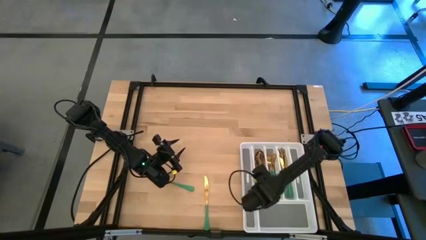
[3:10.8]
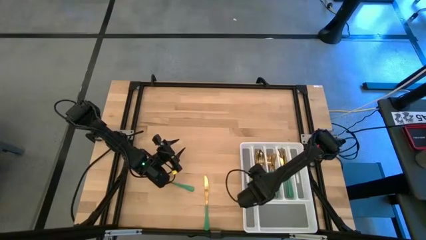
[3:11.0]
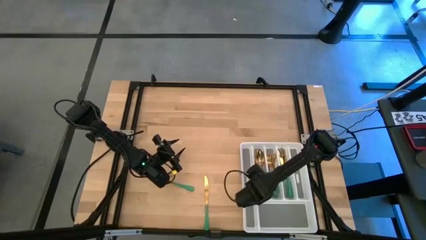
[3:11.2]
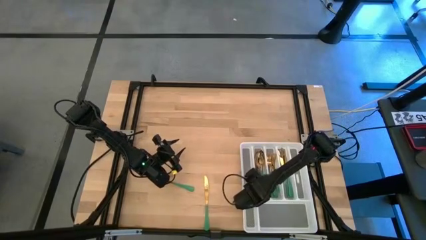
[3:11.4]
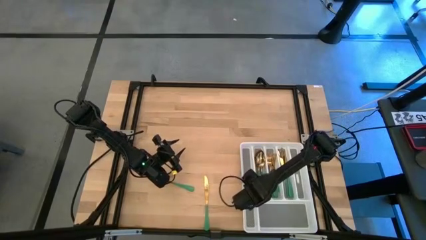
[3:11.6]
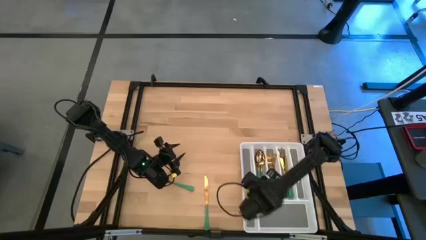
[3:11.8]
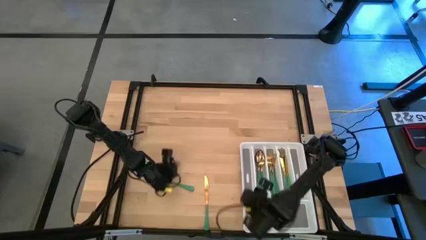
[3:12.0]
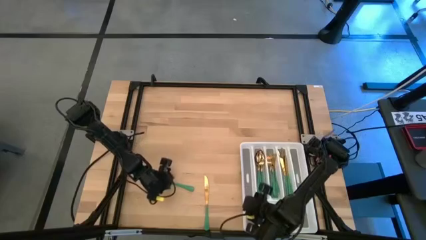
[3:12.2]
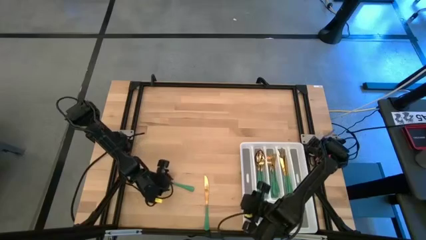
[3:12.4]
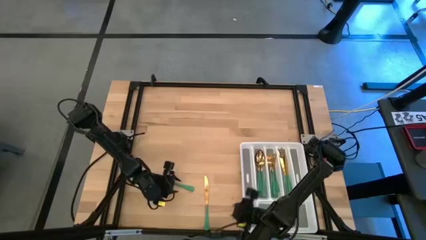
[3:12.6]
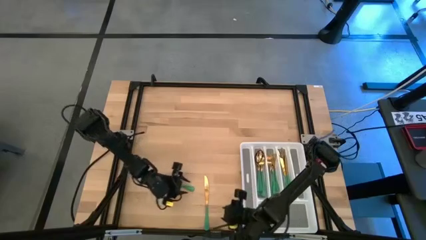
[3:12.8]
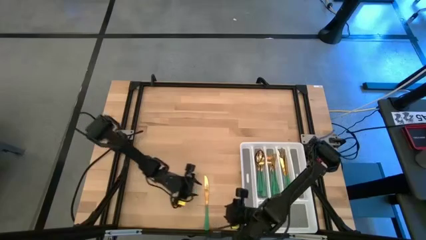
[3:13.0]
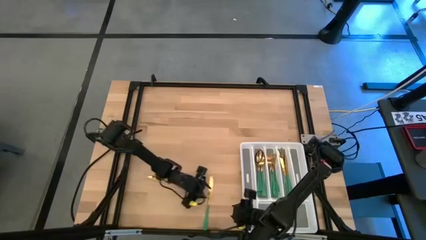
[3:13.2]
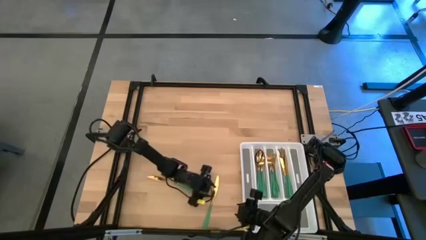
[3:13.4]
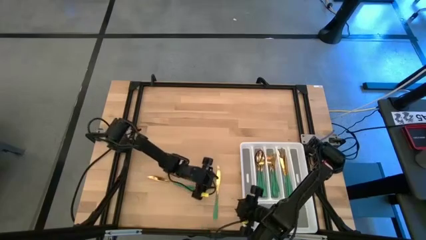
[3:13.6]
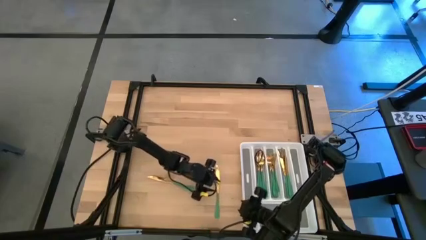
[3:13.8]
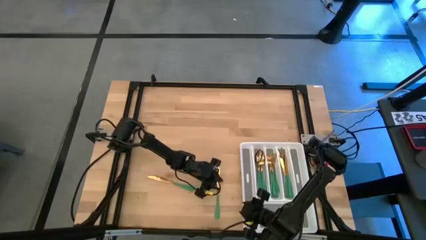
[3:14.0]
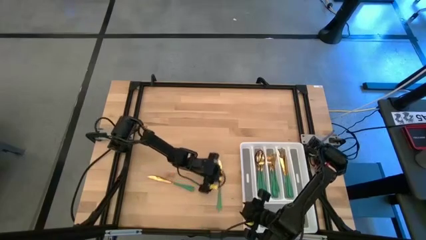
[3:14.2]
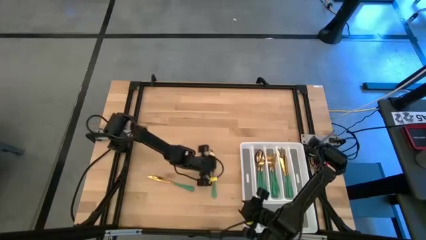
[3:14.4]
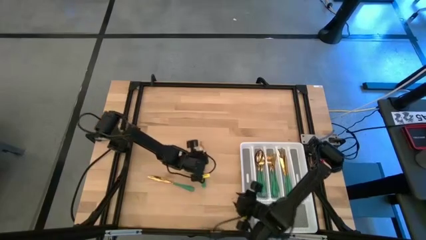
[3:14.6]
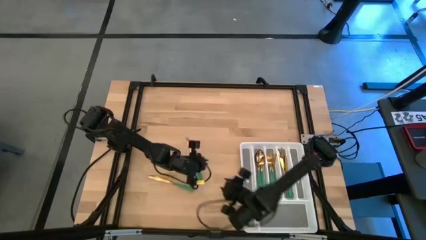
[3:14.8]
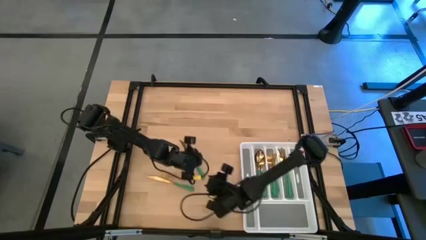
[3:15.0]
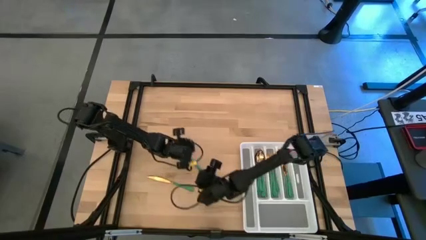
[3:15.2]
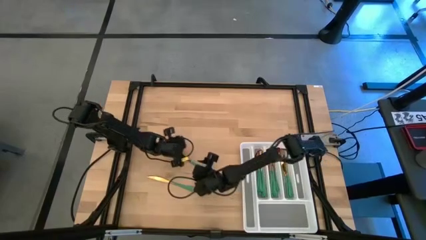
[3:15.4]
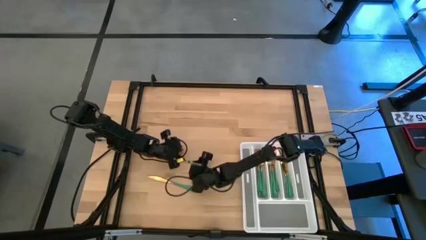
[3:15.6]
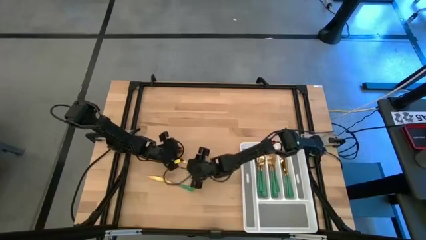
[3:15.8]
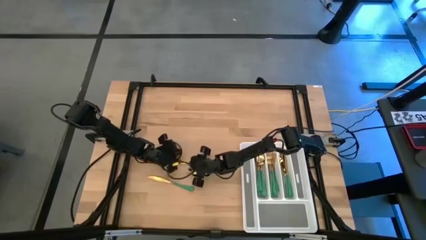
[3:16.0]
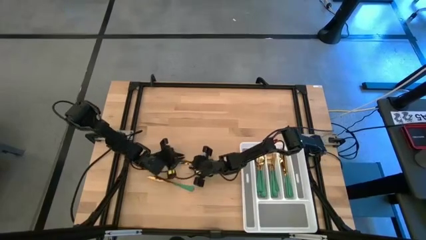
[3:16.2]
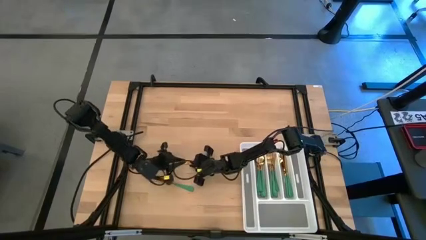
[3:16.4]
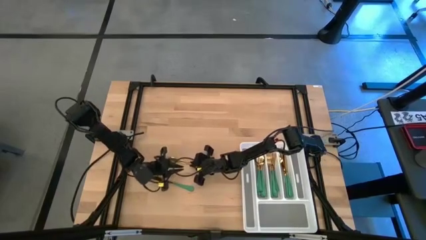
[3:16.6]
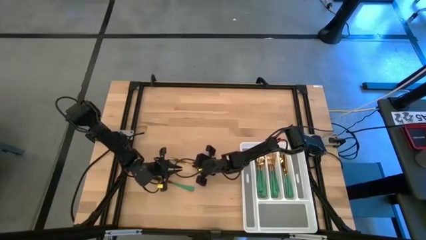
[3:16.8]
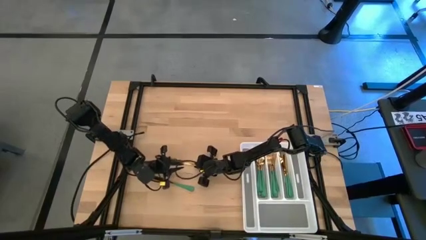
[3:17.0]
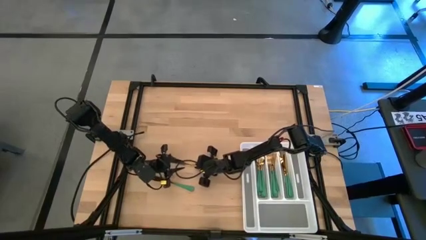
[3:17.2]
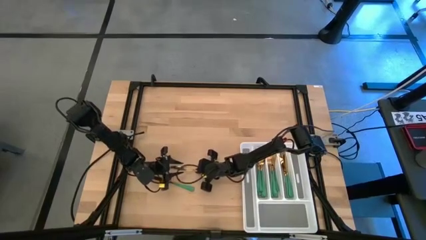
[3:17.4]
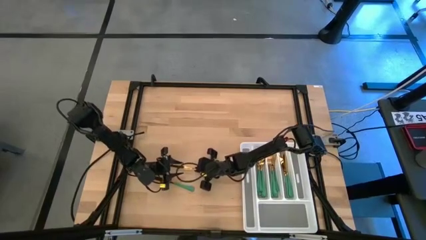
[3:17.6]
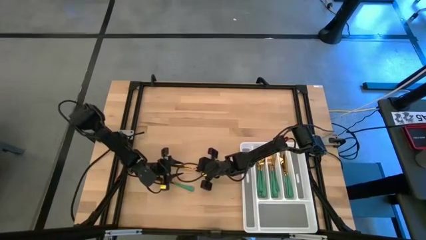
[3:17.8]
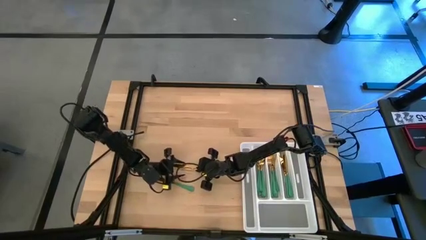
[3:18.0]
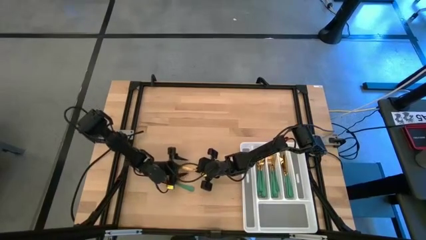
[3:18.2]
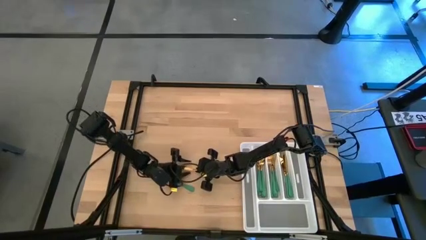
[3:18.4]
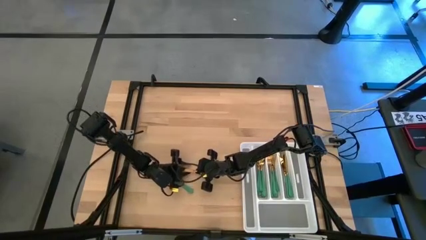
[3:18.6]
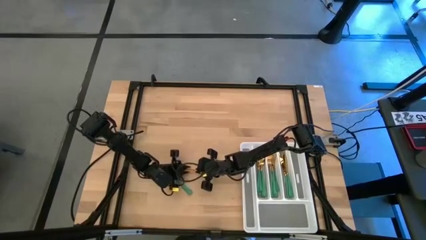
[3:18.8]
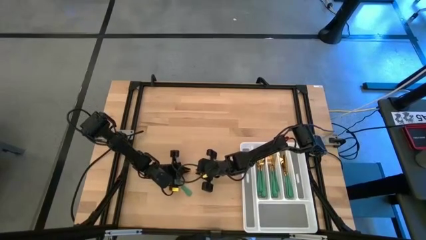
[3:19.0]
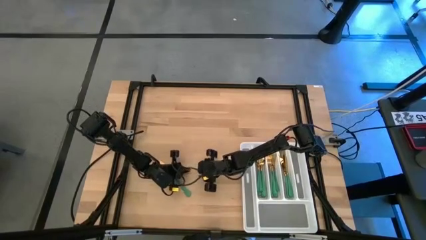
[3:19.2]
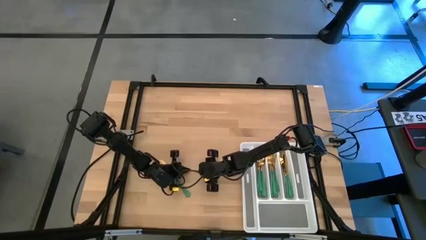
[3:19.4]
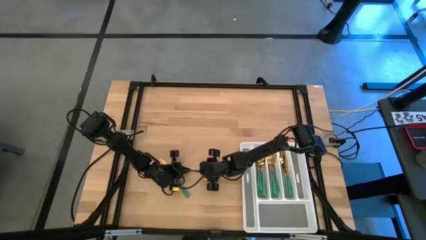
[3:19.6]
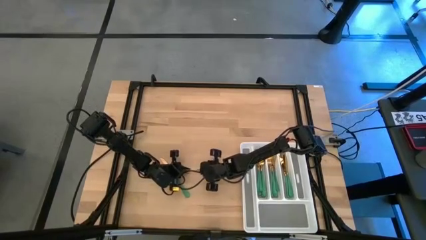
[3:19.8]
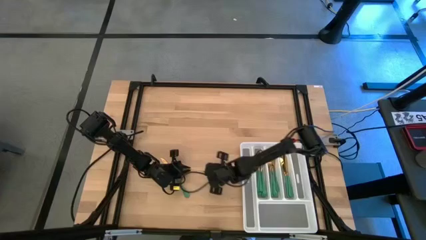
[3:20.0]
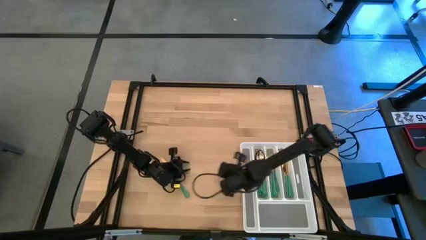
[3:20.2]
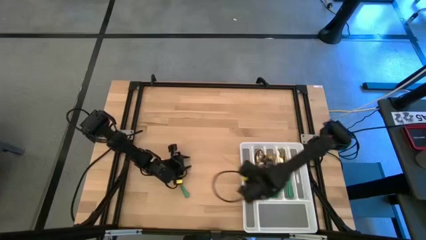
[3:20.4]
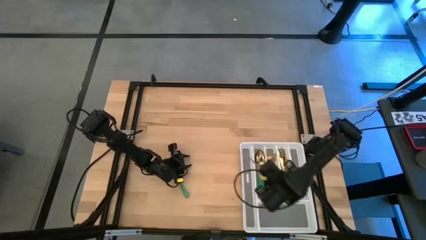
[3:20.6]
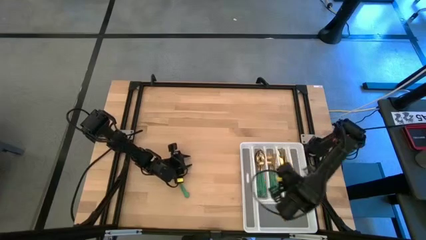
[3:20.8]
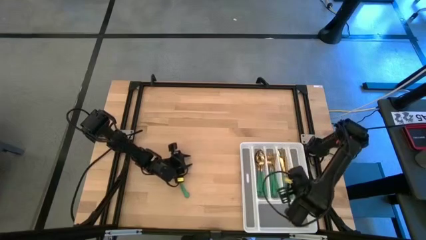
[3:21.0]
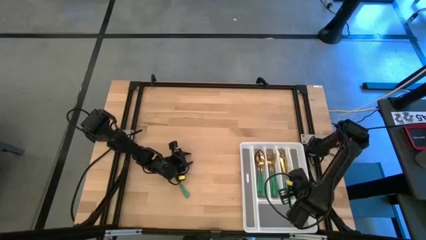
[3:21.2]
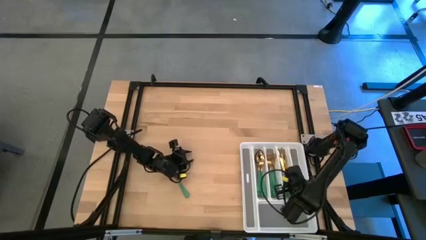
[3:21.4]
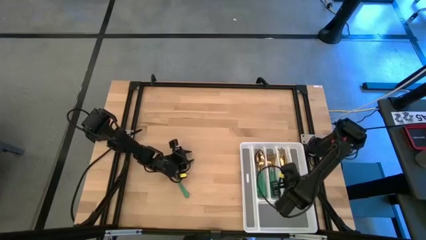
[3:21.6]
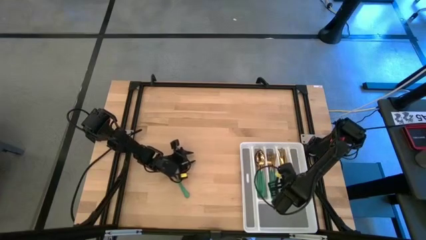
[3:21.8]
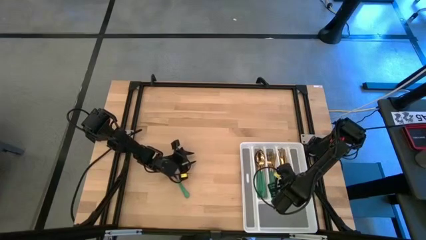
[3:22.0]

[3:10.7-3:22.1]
Task: Sort silverware
Put the bottom green knife into the silverware rack

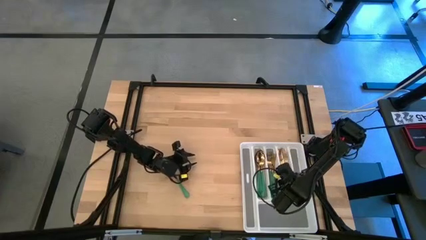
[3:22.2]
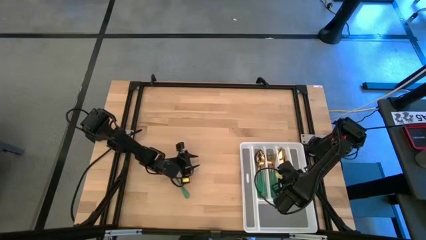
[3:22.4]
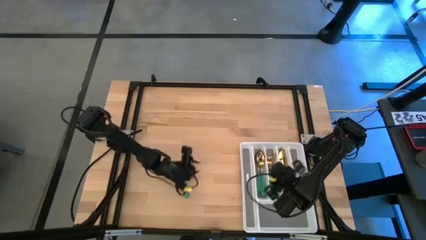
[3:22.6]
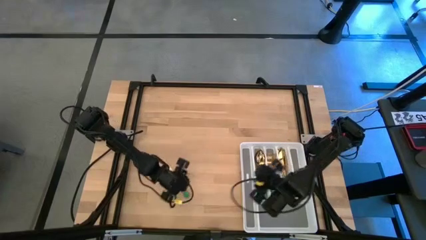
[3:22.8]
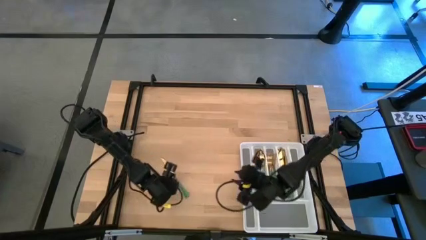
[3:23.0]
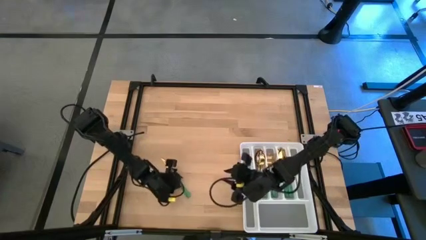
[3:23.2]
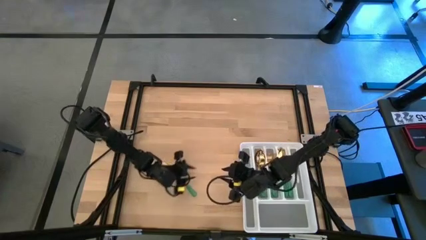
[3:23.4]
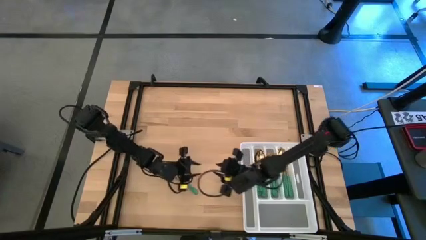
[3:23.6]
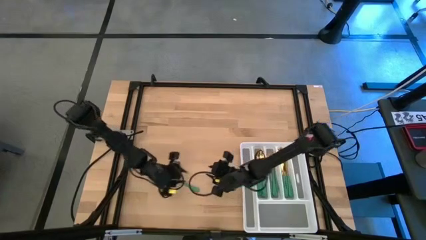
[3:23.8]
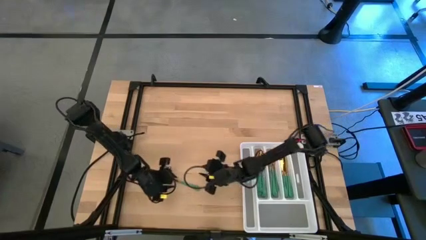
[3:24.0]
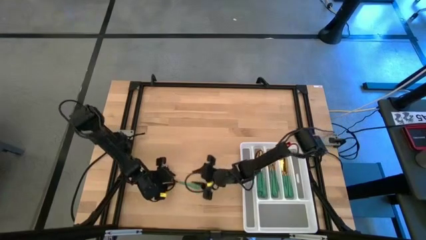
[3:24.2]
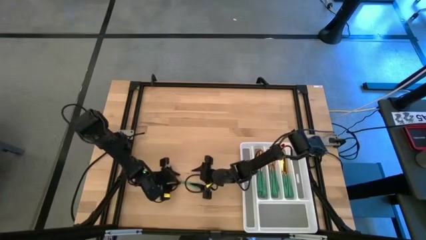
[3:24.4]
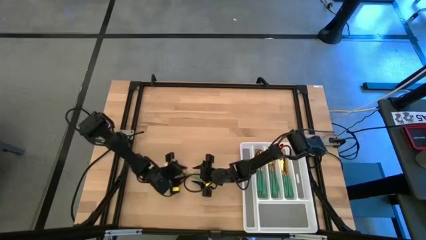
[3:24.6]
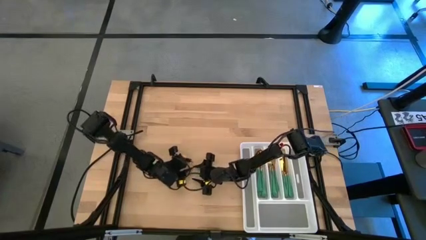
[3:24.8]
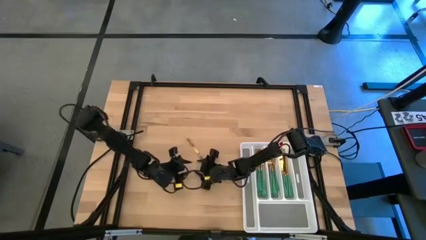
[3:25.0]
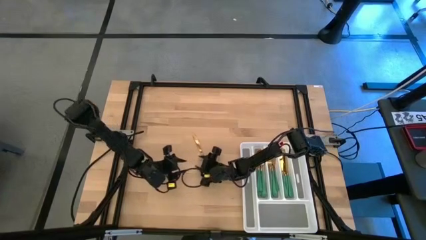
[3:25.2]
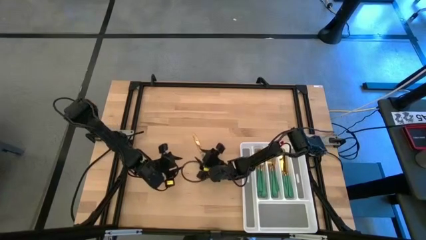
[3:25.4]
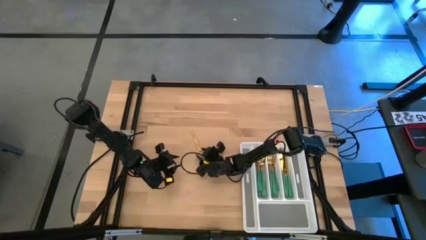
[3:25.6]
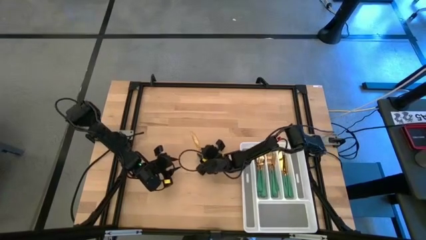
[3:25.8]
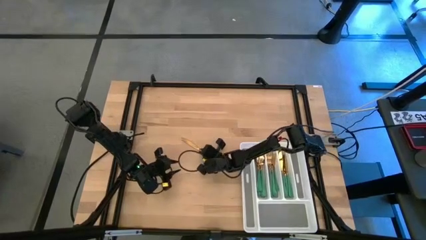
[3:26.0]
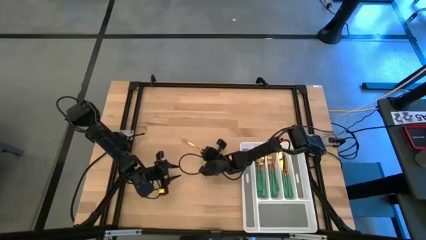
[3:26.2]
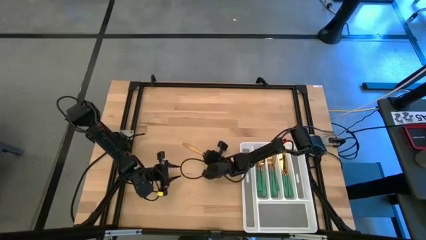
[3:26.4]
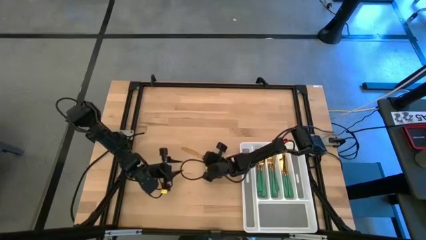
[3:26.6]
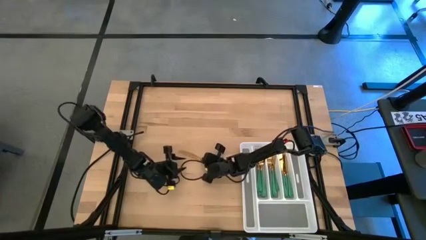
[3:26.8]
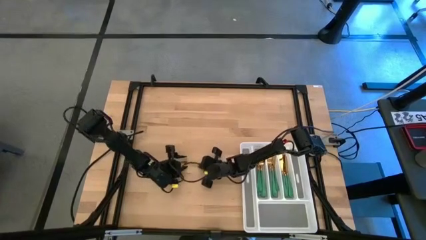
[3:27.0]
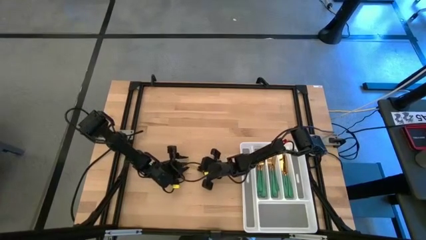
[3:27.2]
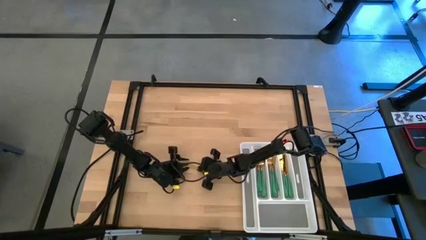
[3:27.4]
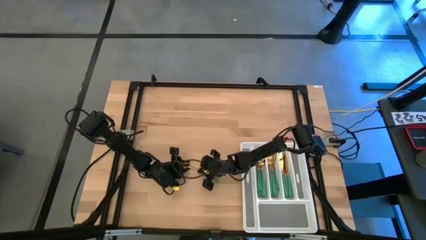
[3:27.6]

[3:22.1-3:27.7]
Put the green knife into the silverware rack
